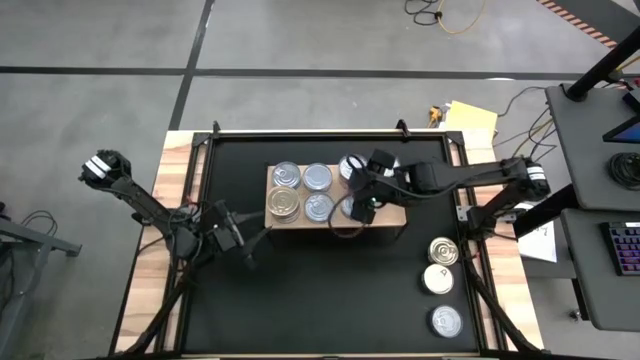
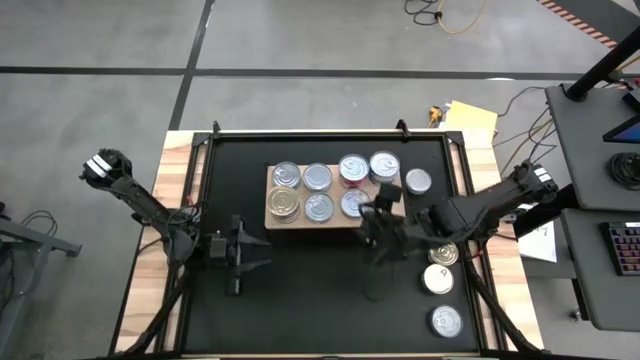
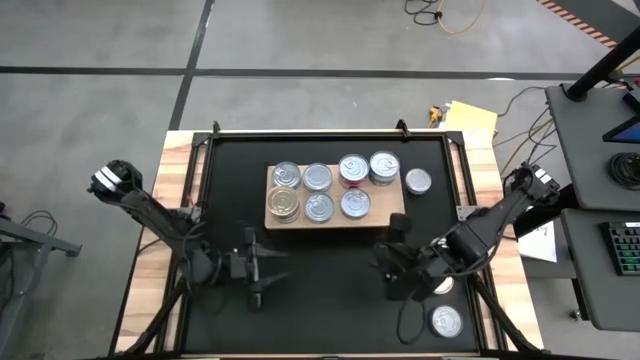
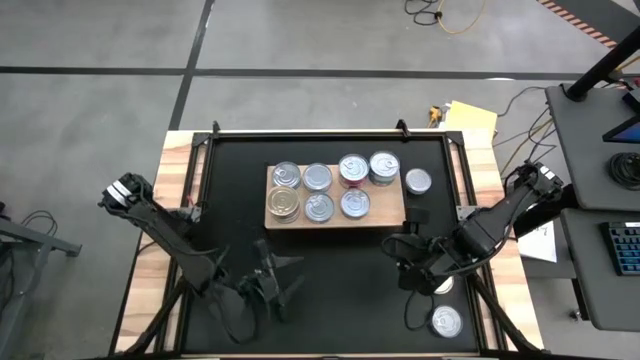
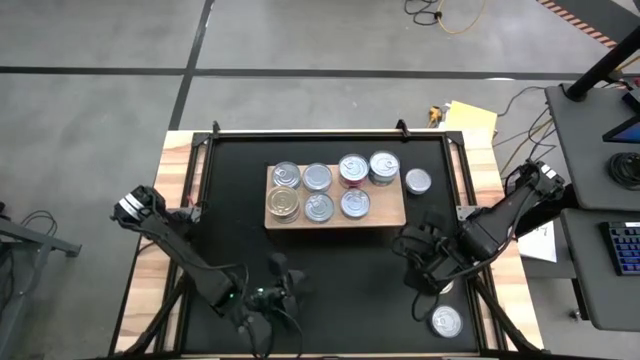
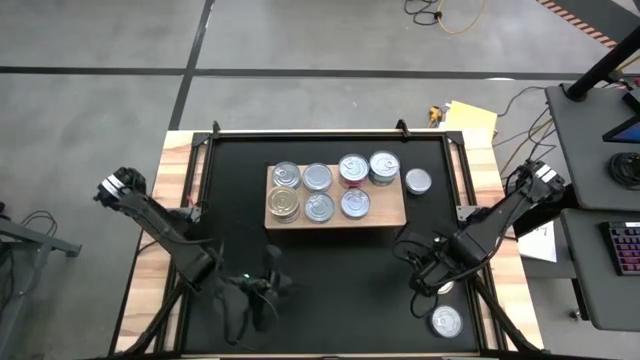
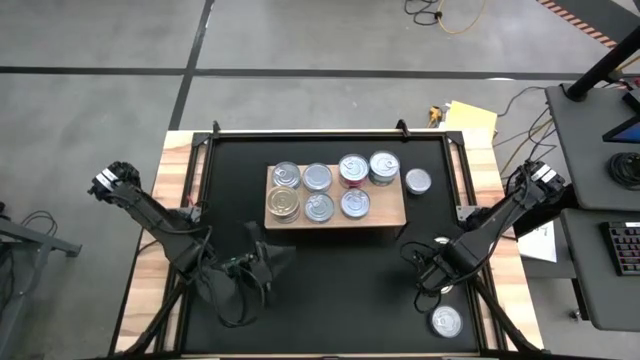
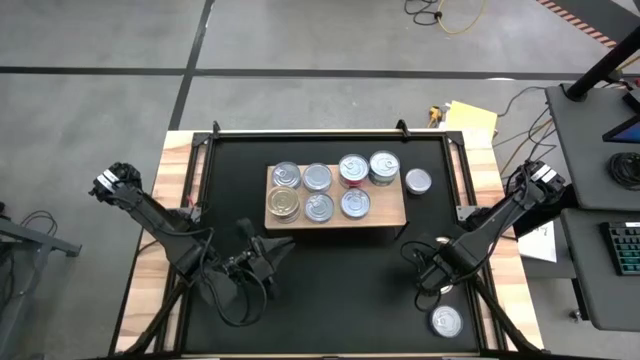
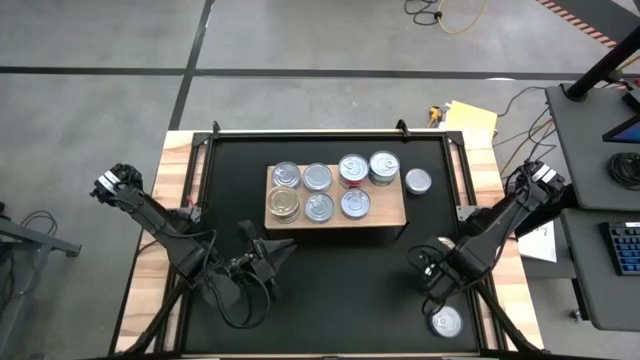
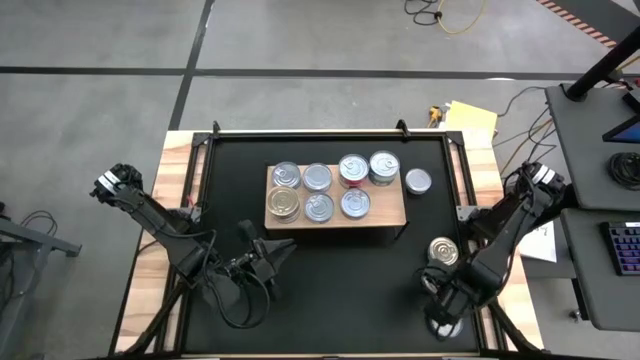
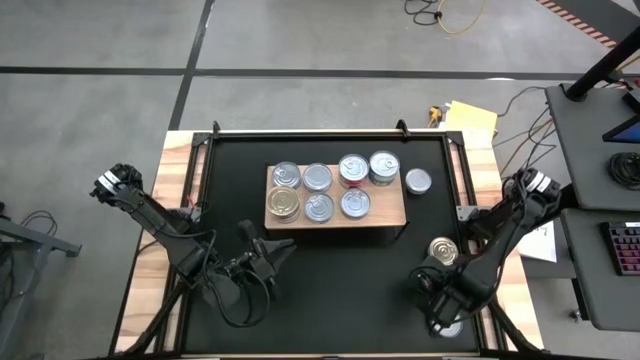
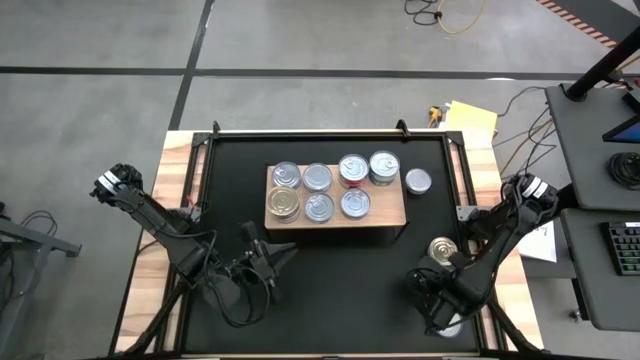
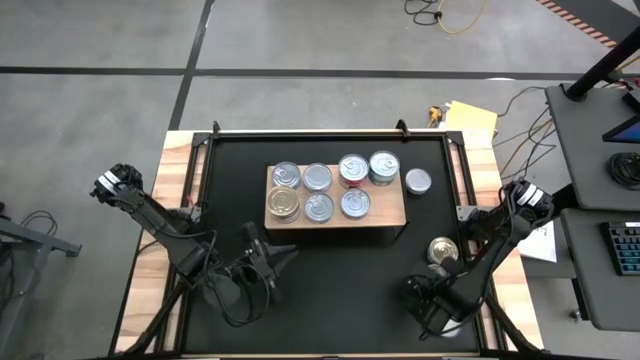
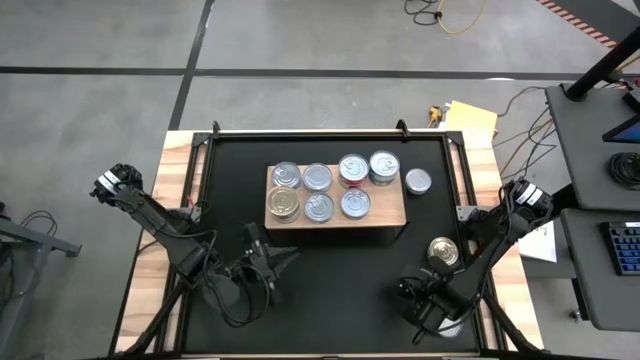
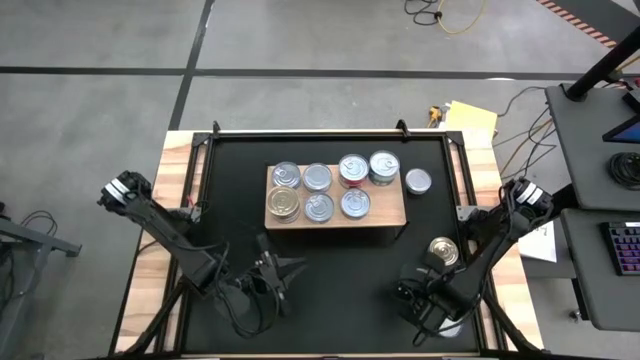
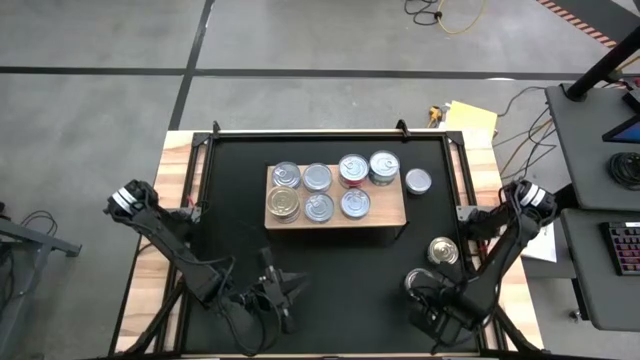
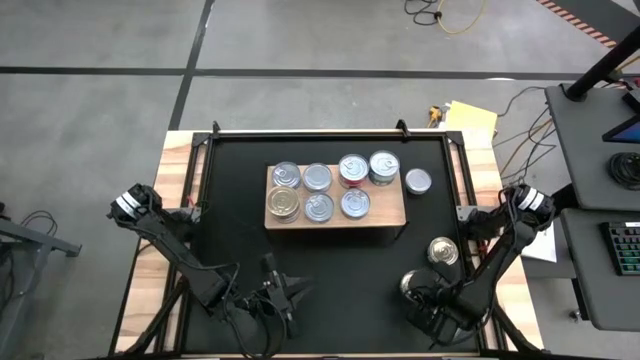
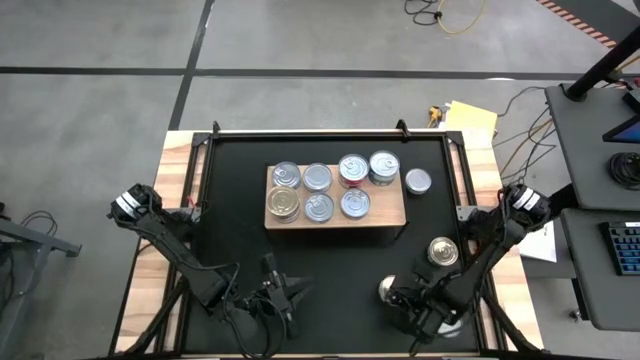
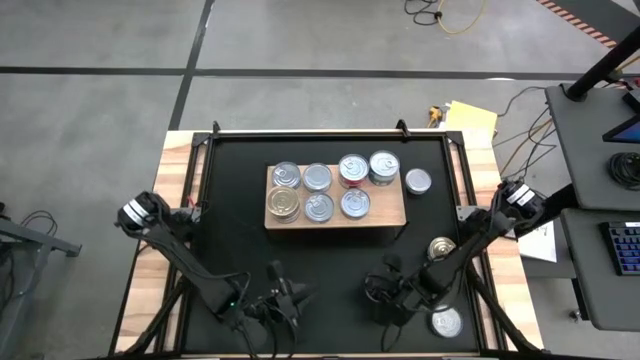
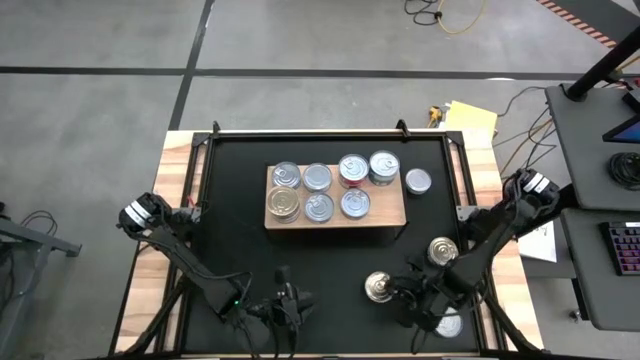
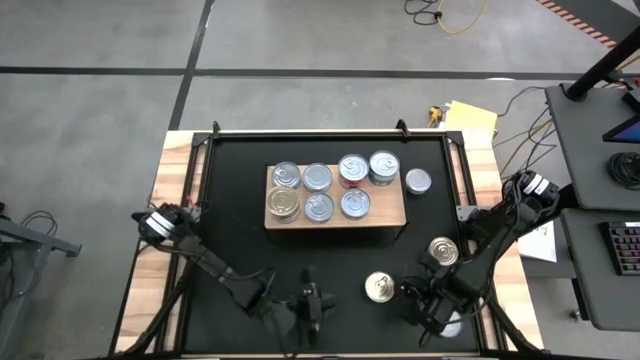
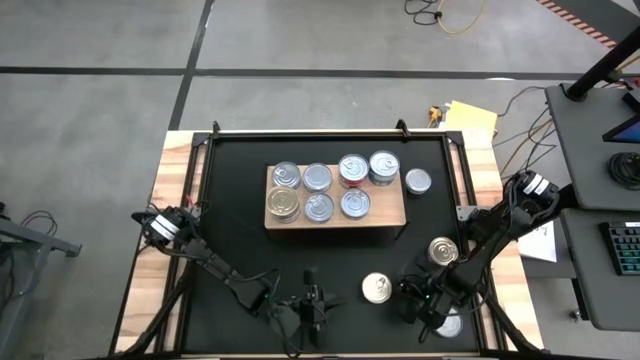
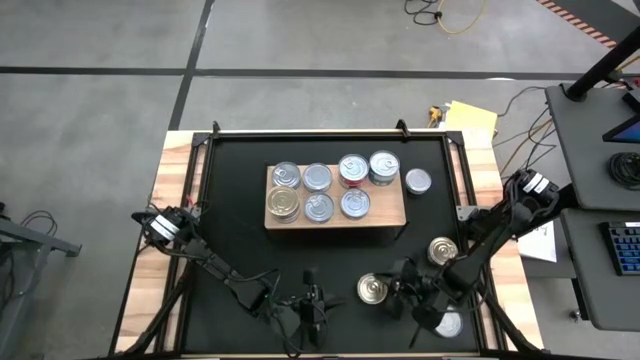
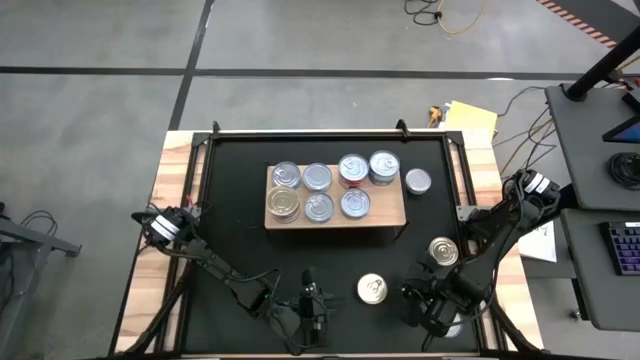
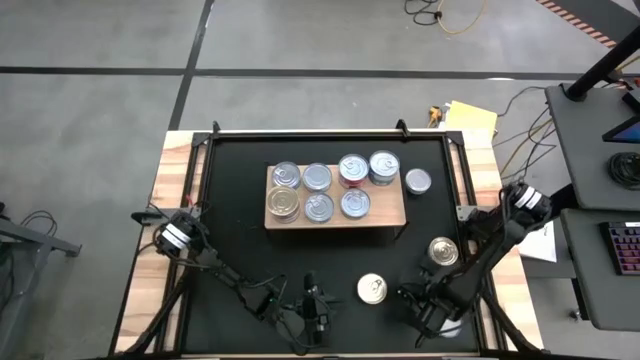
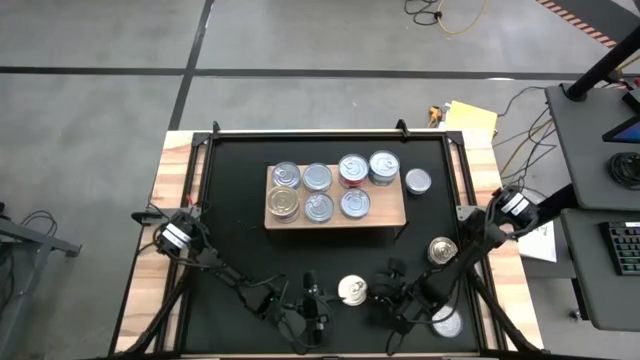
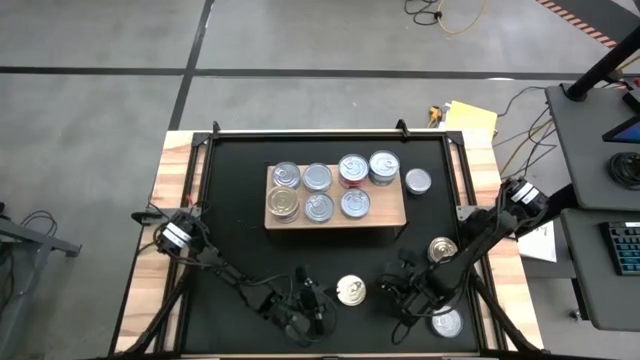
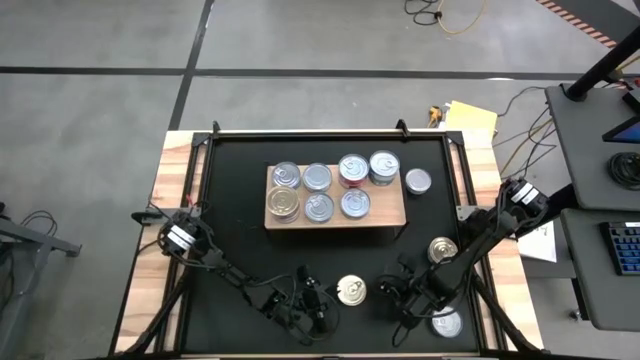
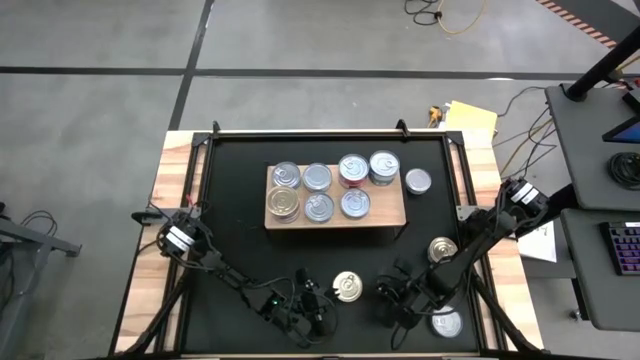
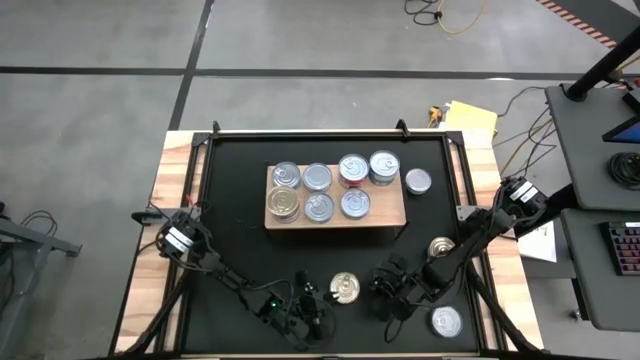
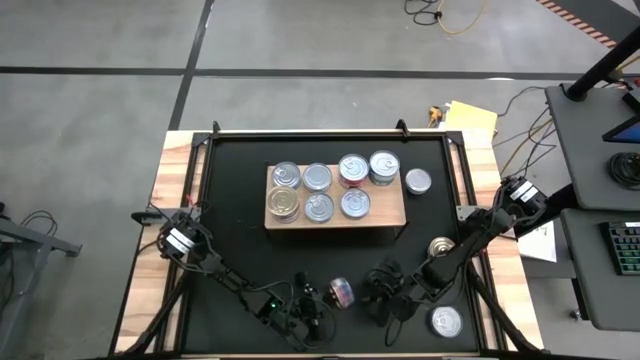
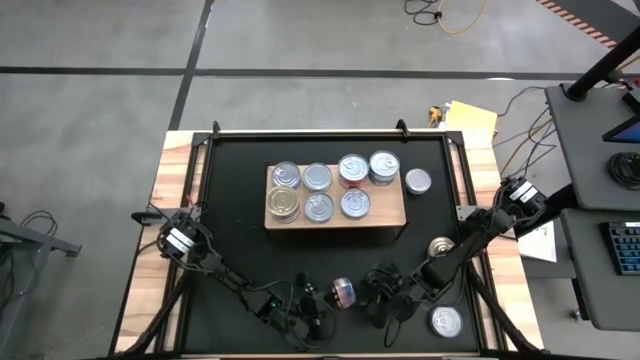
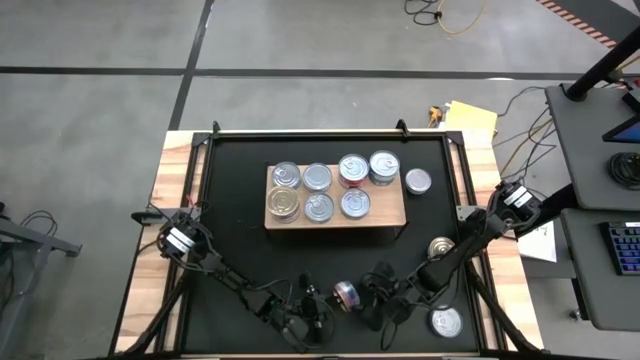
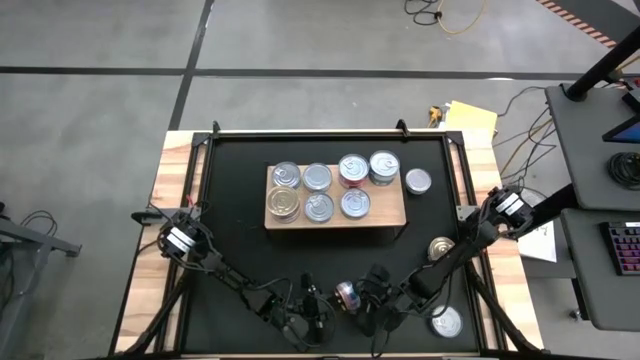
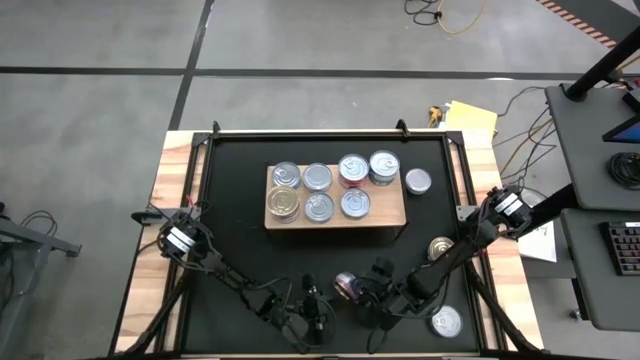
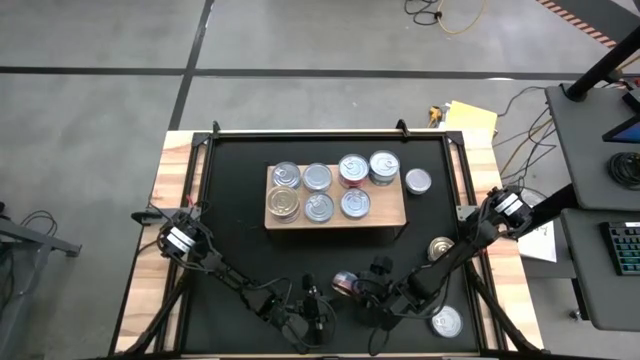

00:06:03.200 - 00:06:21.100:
Task: Stack canned seafood by type on shelf
Stack the blue tuna can on the blue tuna can
